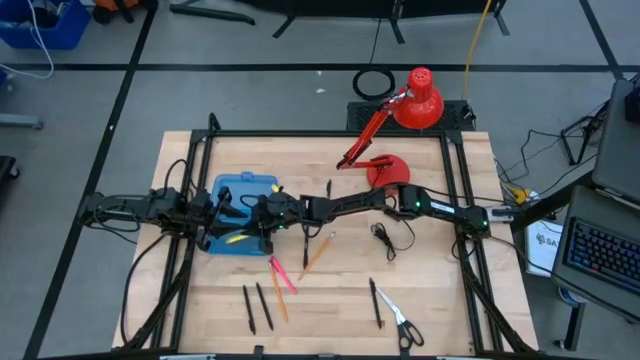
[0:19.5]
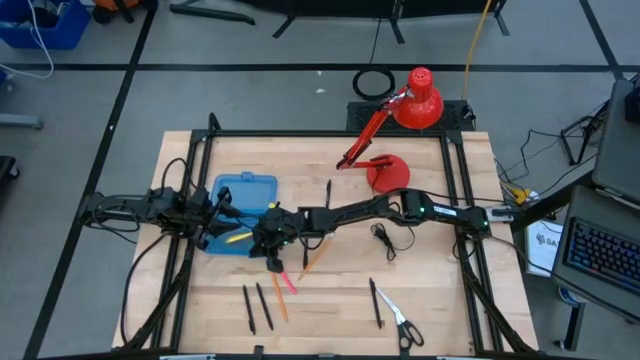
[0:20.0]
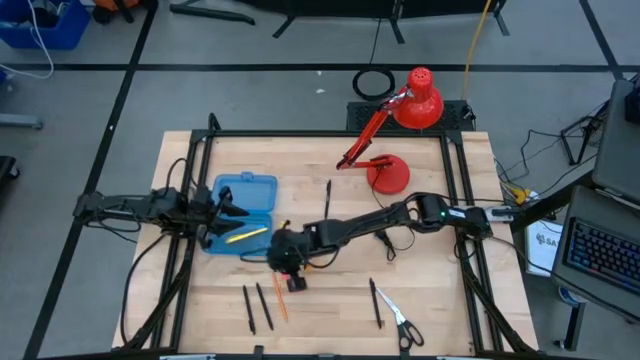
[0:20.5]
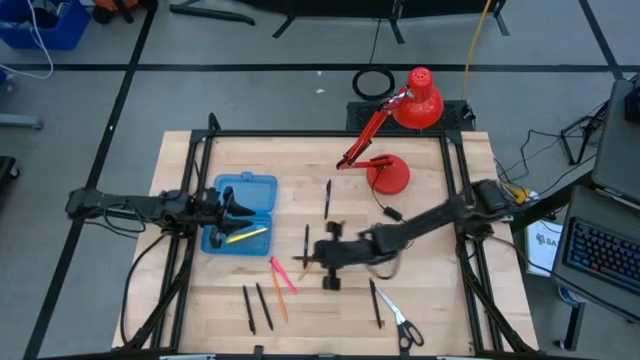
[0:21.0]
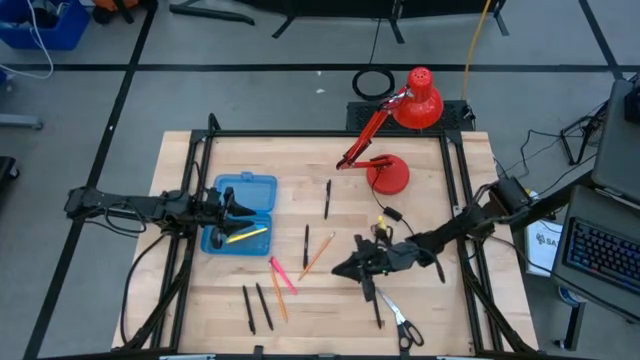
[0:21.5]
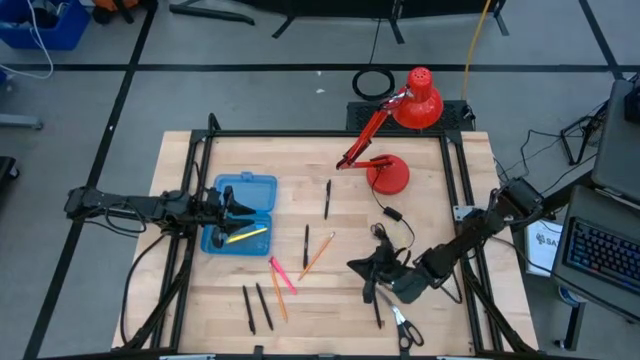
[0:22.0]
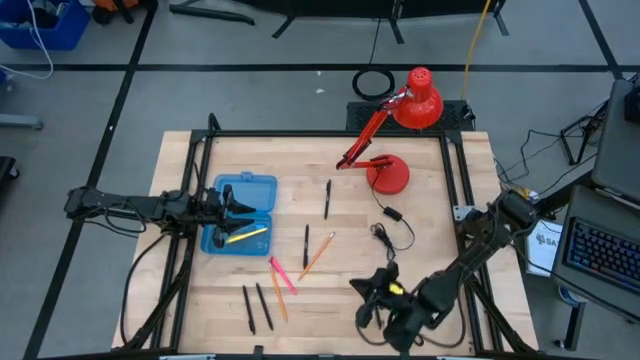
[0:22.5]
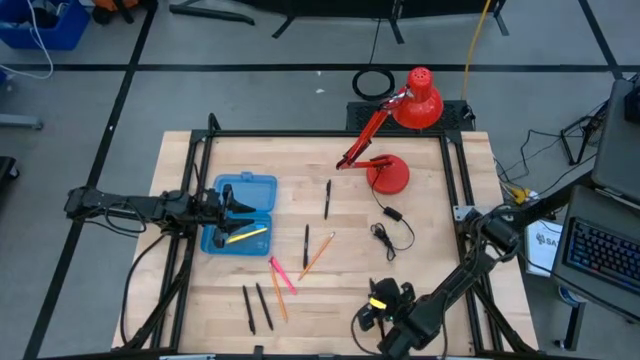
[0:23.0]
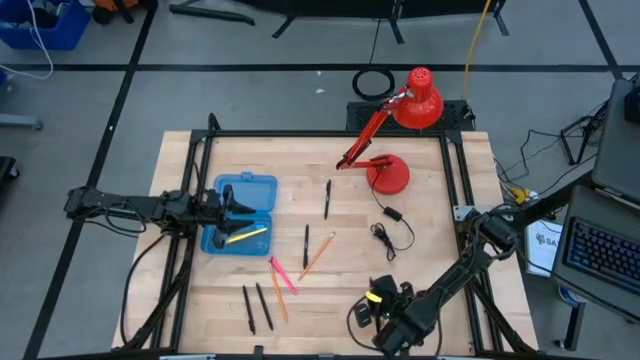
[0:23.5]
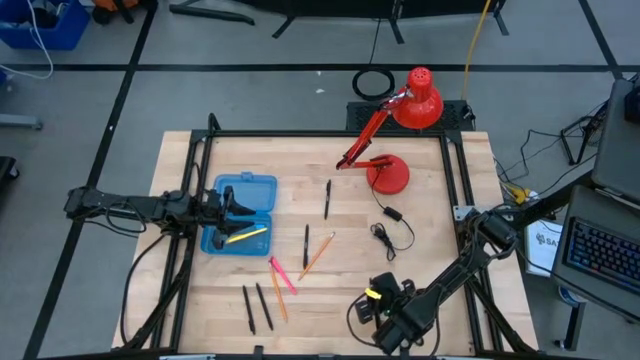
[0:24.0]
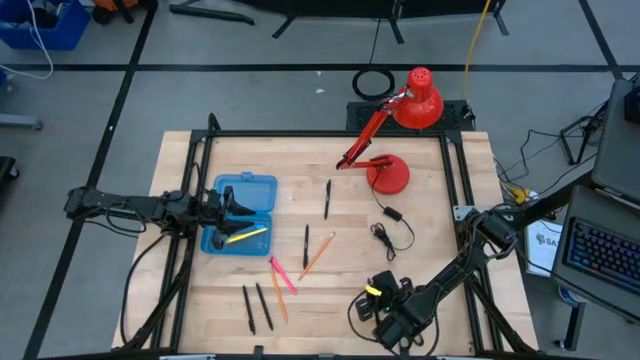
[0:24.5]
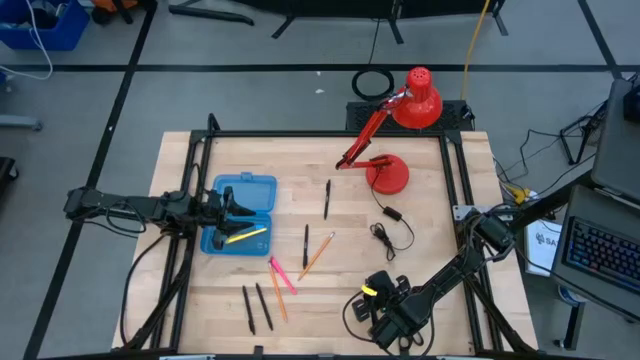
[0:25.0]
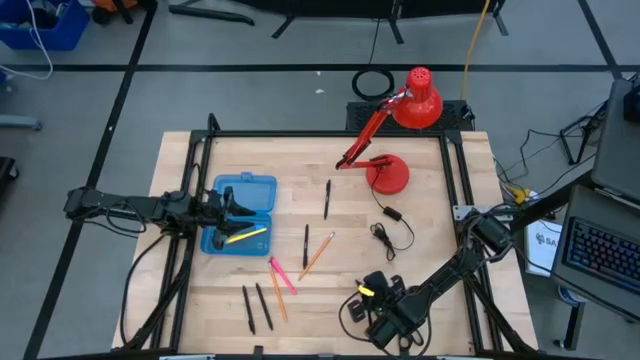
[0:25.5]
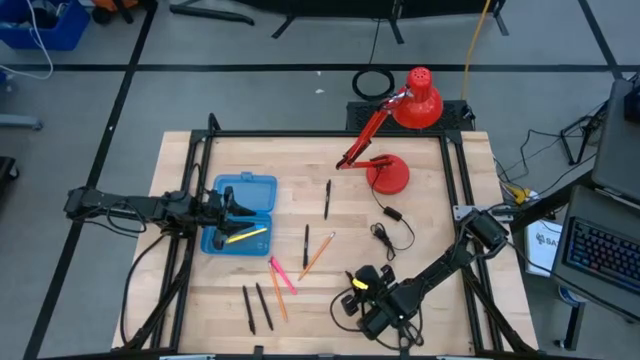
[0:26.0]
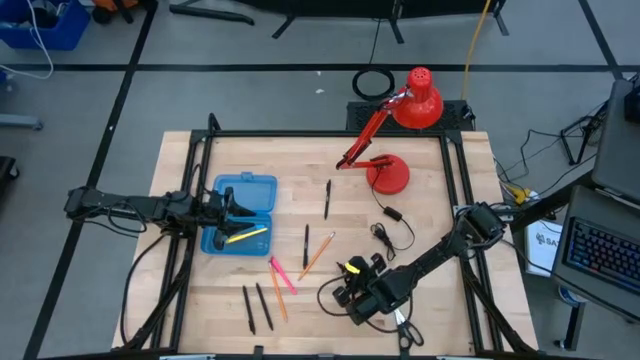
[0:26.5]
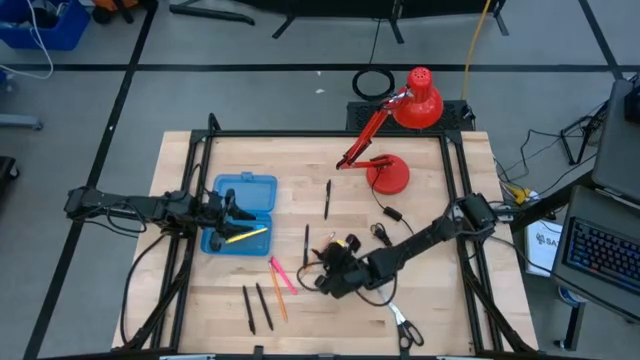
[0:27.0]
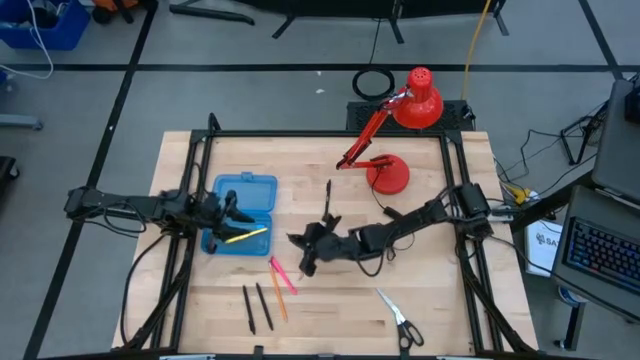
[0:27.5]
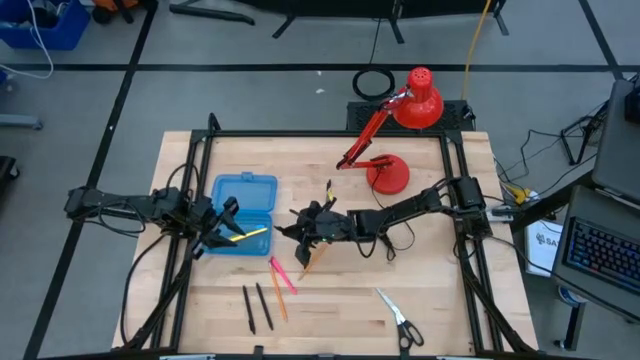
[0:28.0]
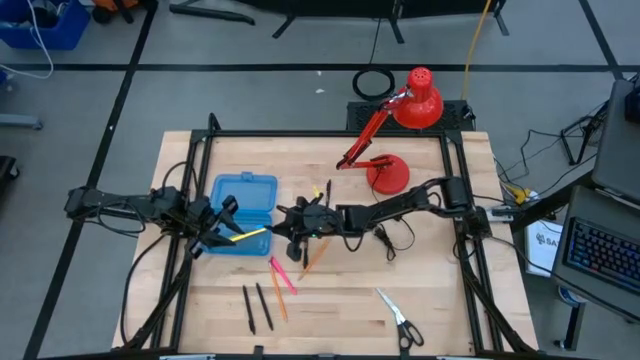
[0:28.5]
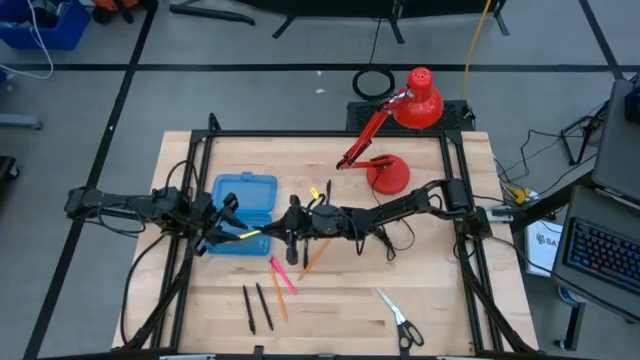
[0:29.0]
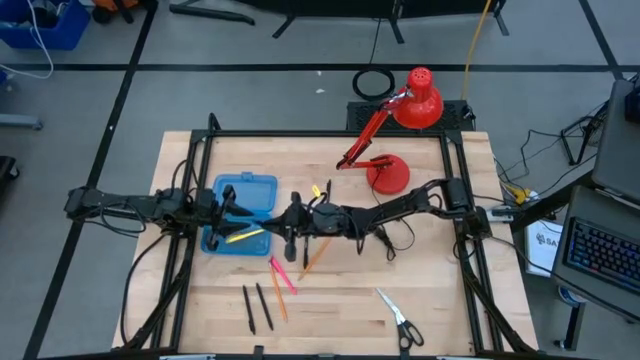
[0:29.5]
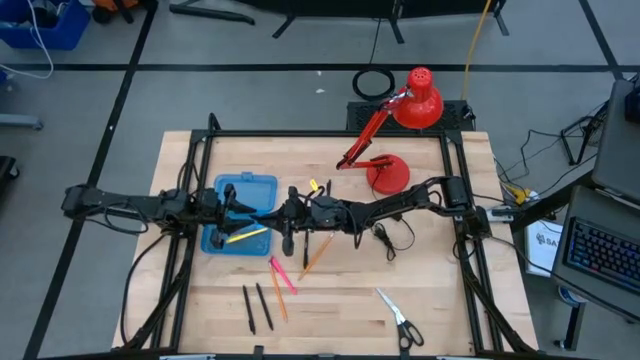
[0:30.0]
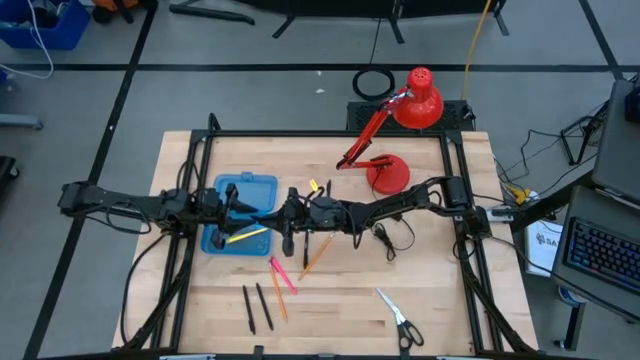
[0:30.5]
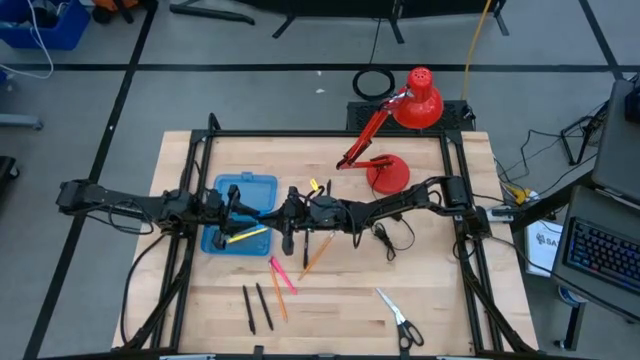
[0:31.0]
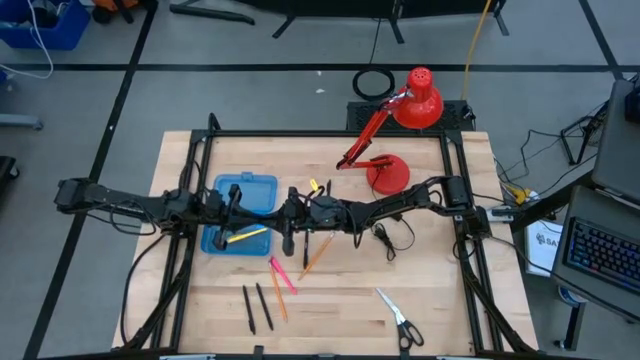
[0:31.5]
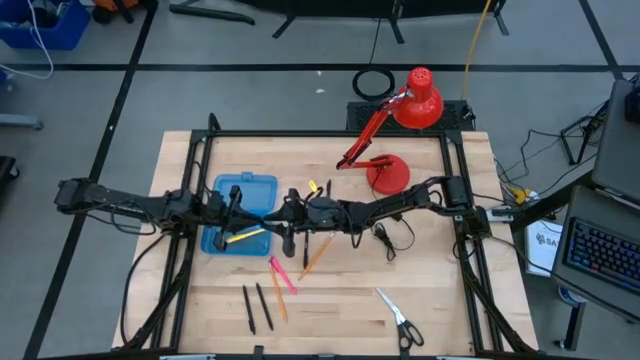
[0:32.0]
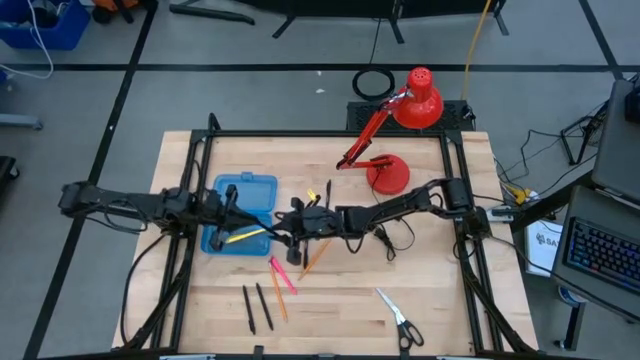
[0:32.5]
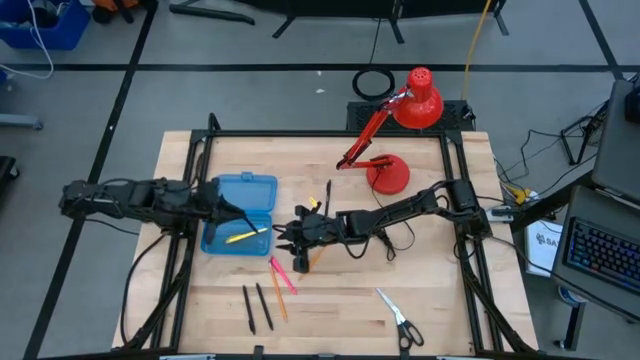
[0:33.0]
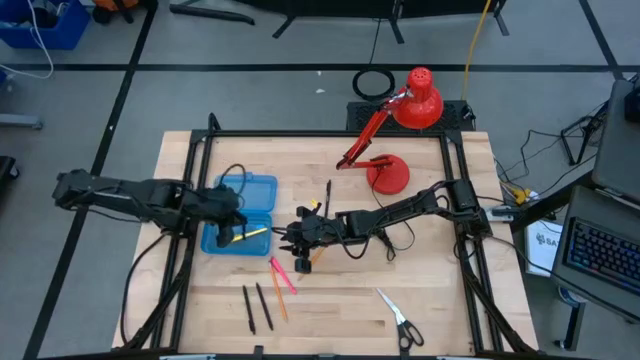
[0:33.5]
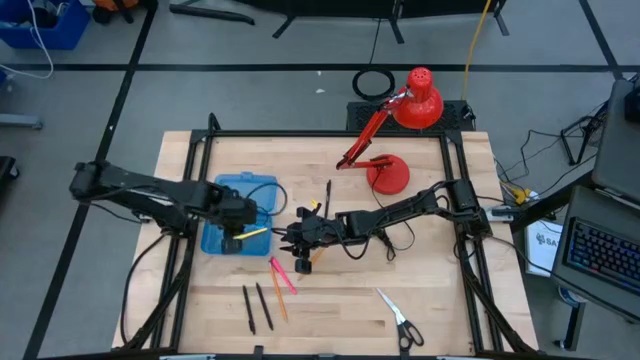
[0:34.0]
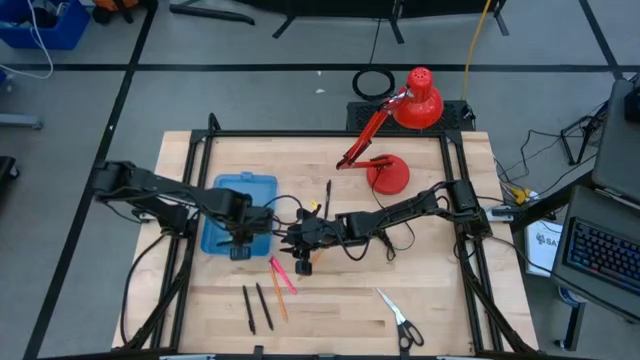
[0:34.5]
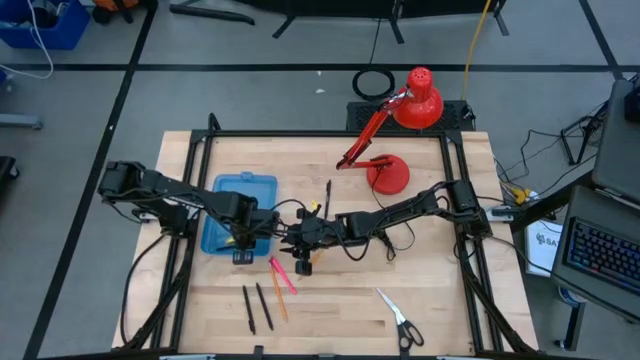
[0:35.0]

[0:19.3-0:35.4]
Task: Pick & place school supplies into a supply box
Put the black pen into the blue supply box

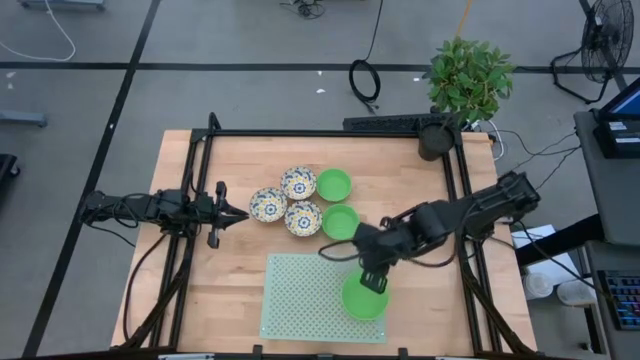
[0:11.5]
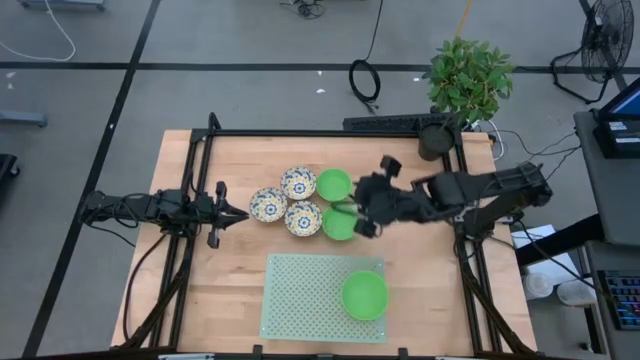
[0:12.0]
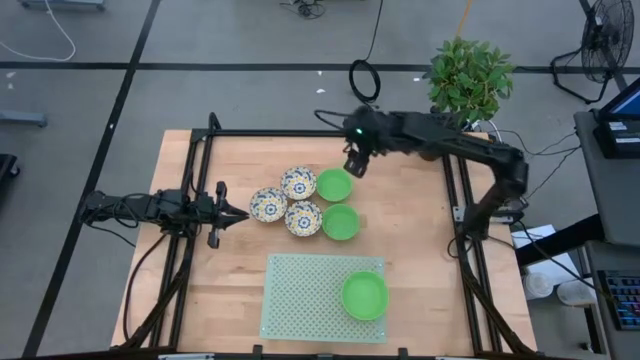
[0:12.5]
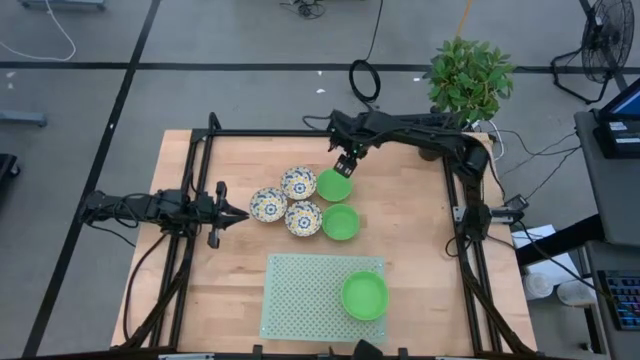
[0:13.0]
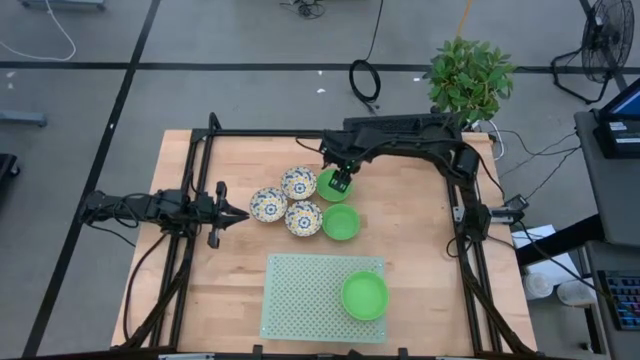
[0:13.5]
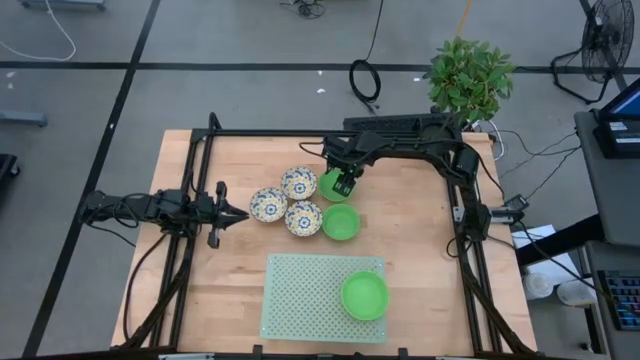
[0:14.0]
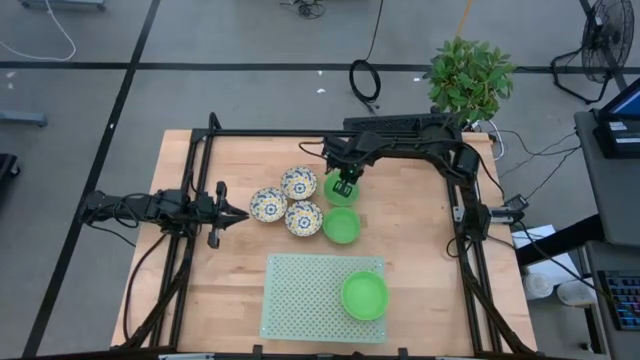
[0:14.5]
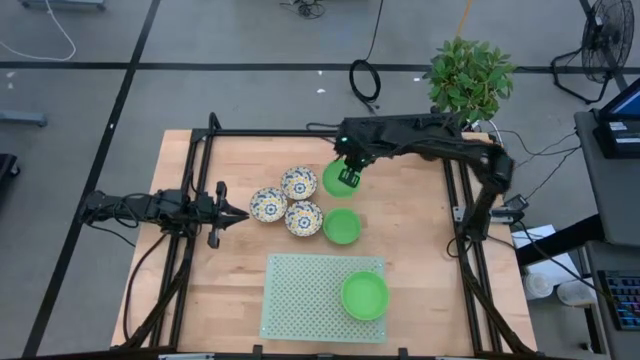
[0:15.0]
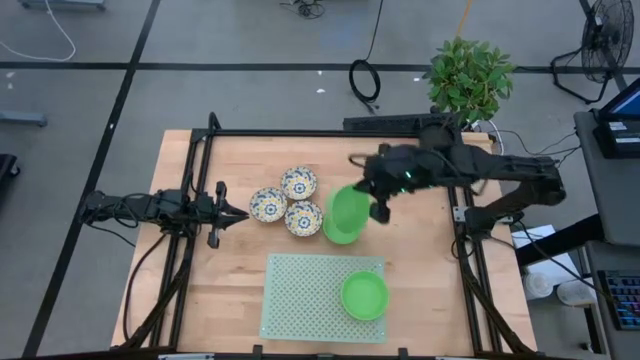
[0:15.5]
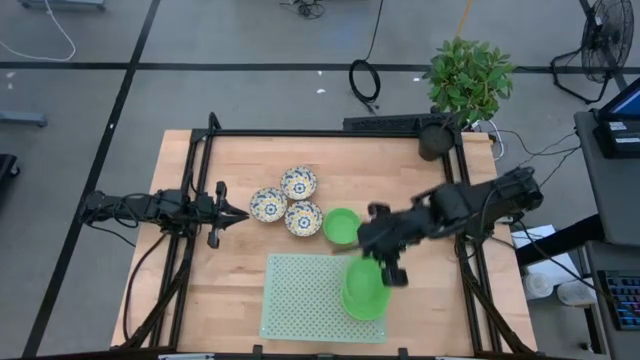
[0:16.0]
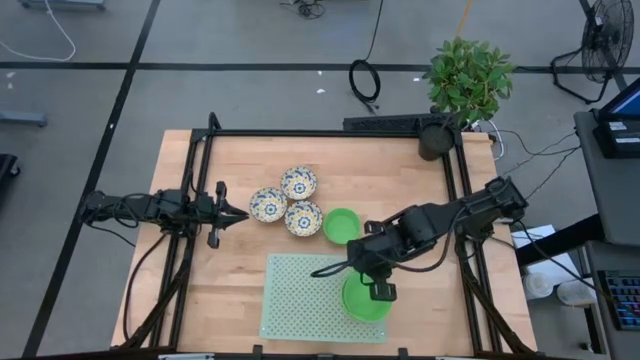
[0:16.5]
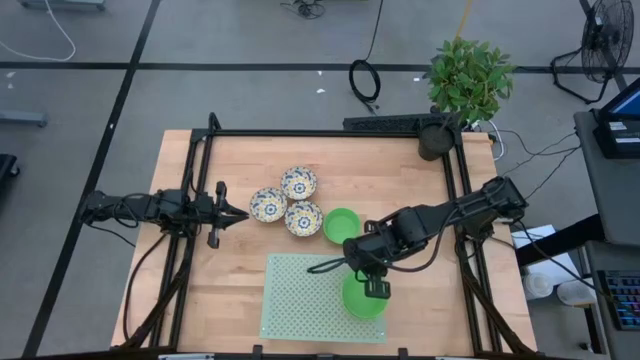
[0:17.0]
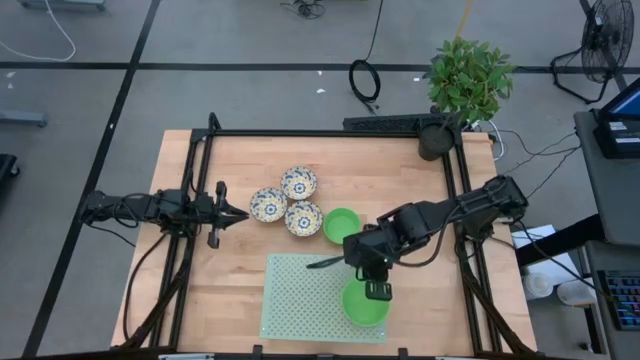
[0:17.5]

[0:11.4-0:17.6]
Task: Pick & Place Mini bowls
Stack the top green bowl on the green bowl on the shelf
